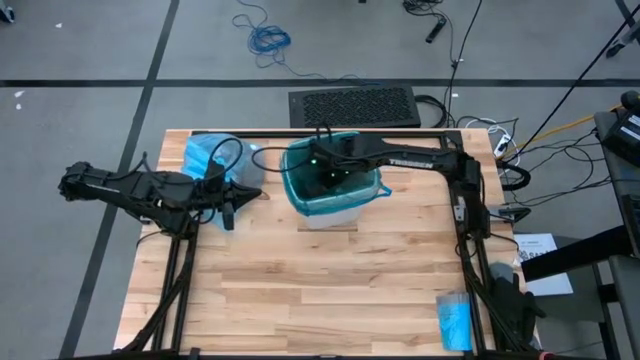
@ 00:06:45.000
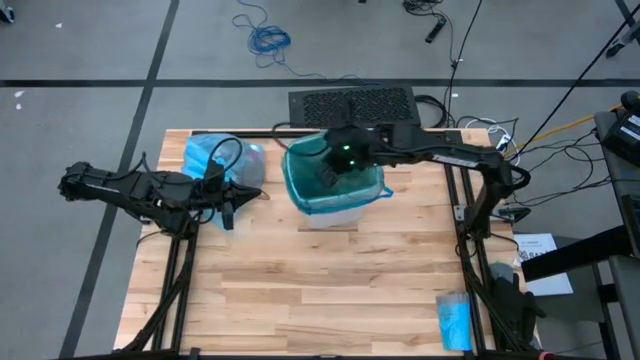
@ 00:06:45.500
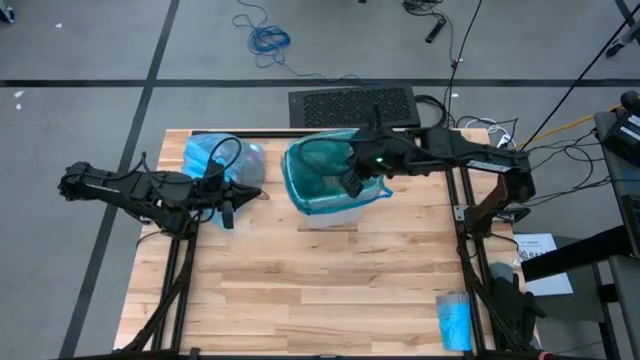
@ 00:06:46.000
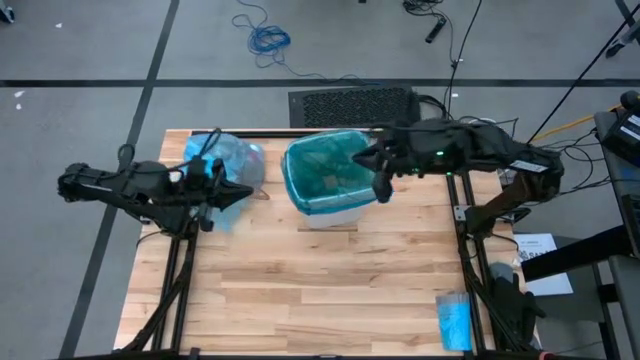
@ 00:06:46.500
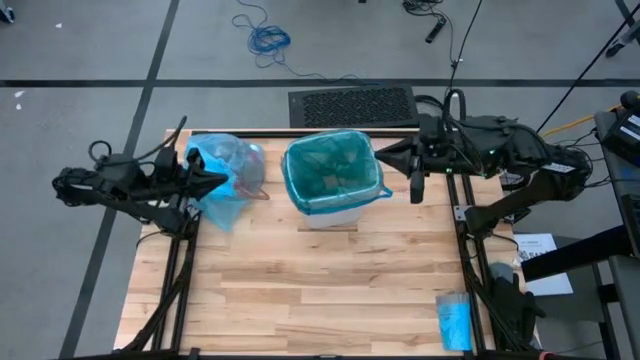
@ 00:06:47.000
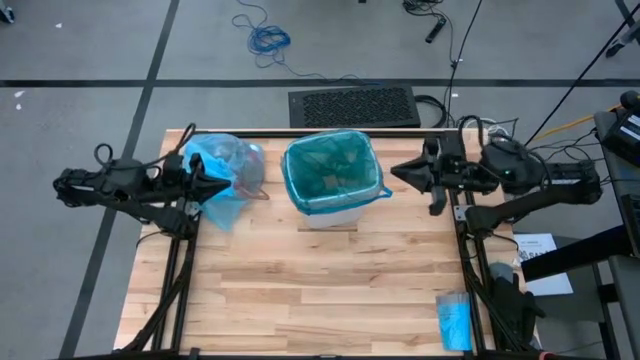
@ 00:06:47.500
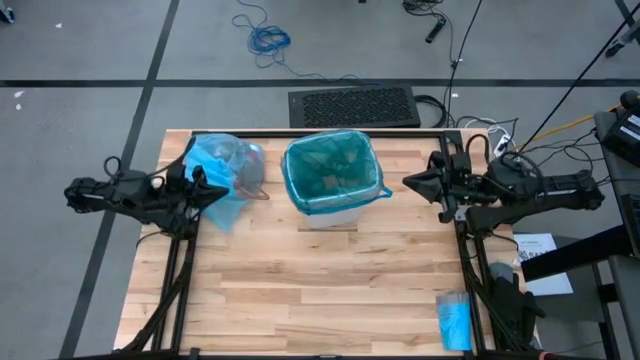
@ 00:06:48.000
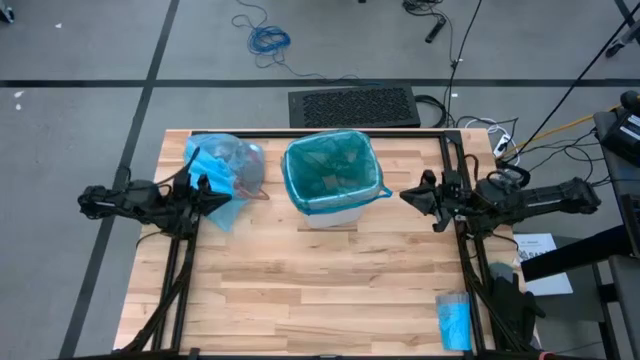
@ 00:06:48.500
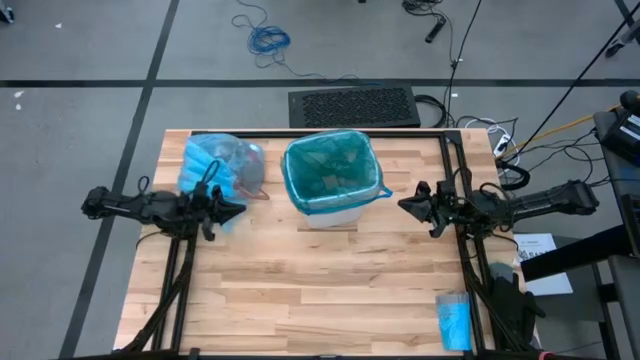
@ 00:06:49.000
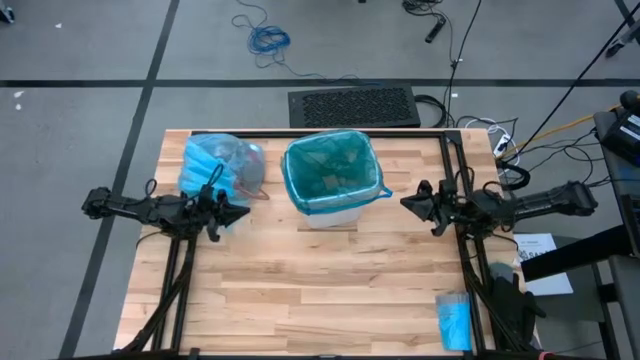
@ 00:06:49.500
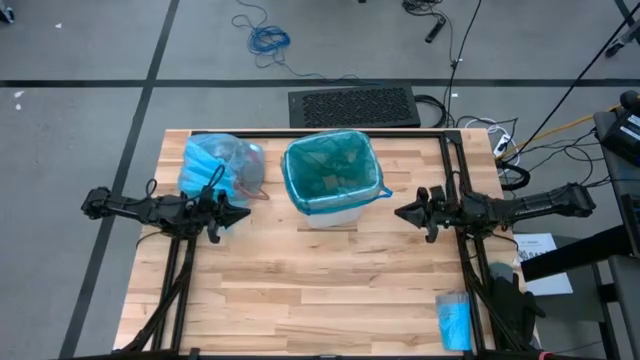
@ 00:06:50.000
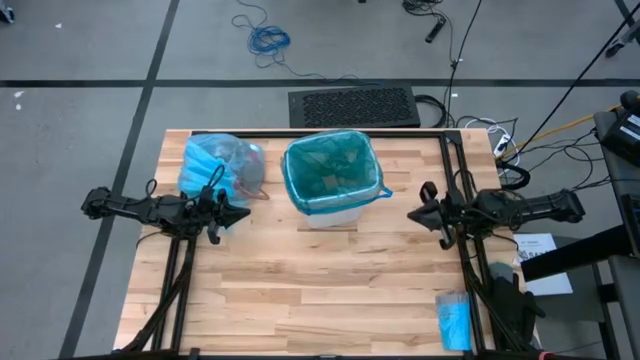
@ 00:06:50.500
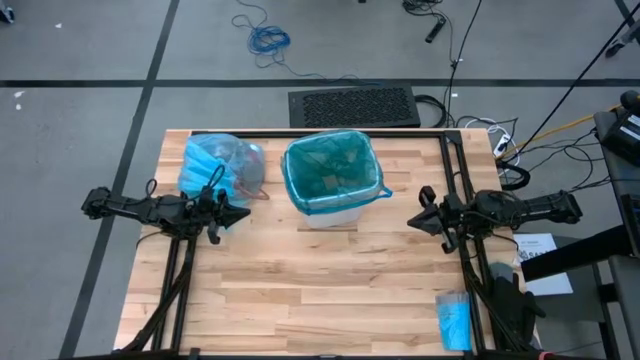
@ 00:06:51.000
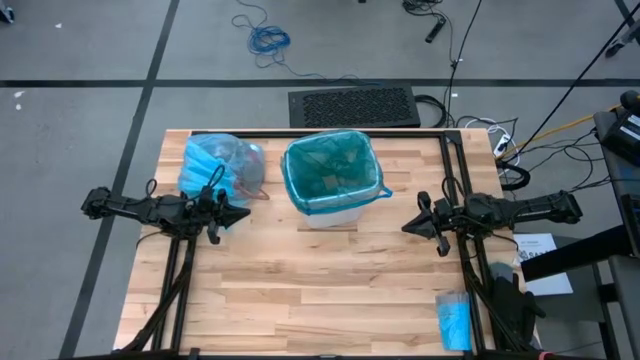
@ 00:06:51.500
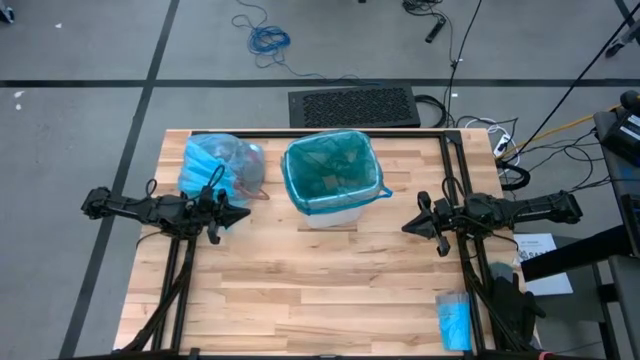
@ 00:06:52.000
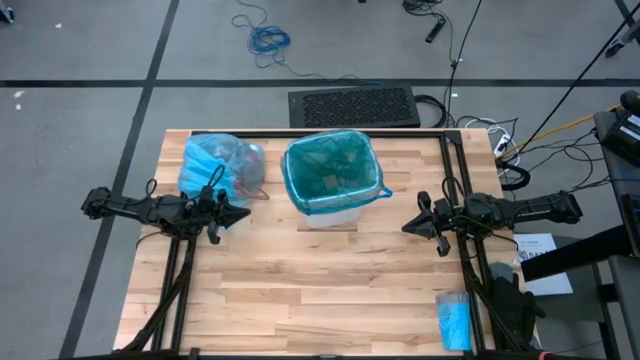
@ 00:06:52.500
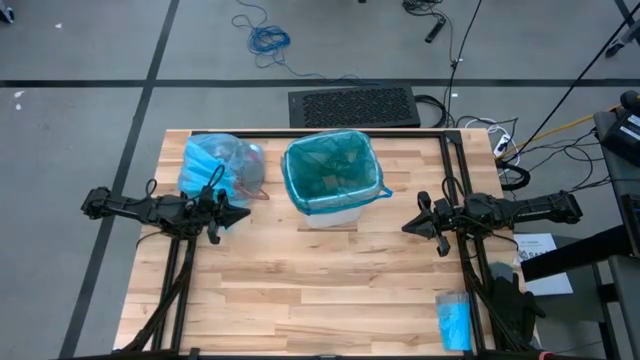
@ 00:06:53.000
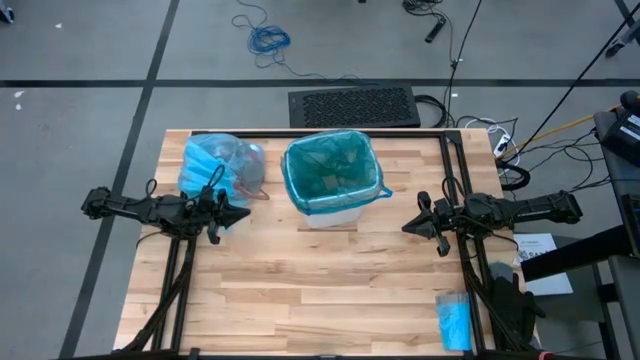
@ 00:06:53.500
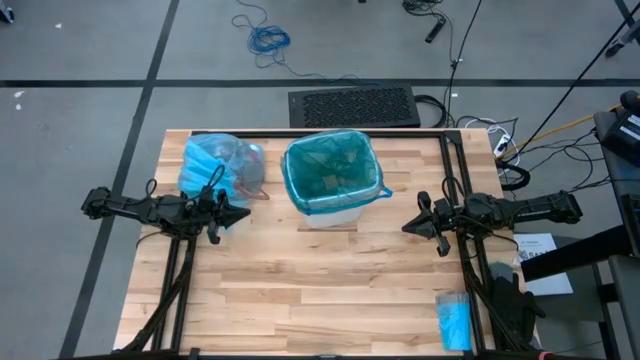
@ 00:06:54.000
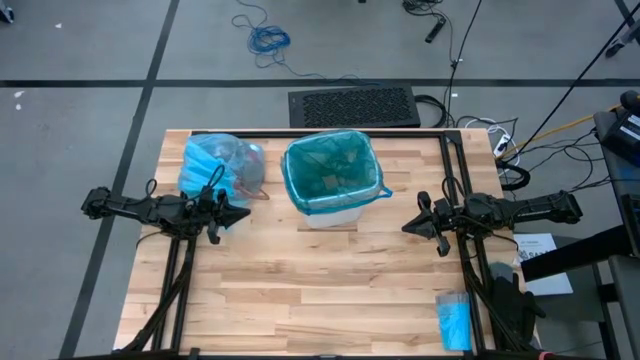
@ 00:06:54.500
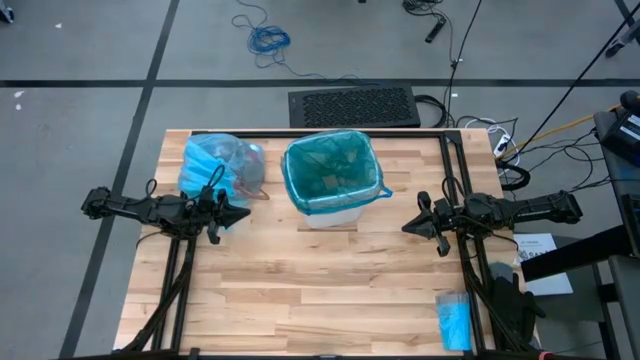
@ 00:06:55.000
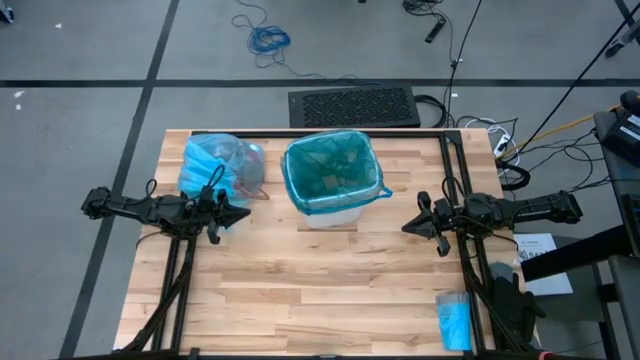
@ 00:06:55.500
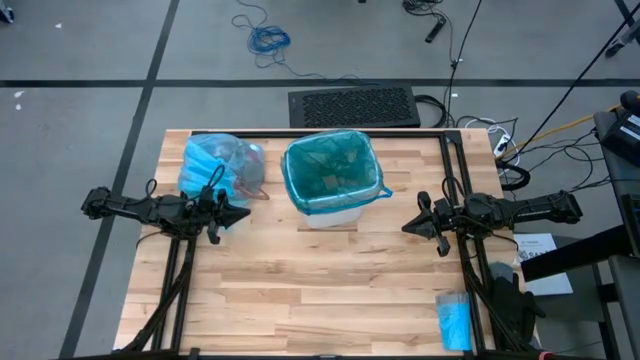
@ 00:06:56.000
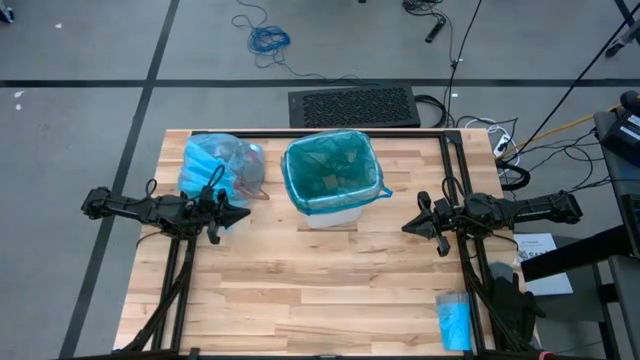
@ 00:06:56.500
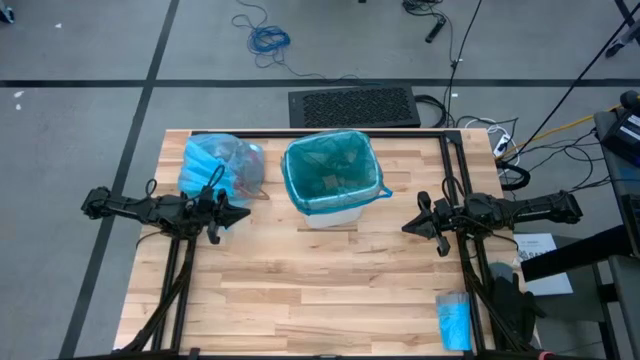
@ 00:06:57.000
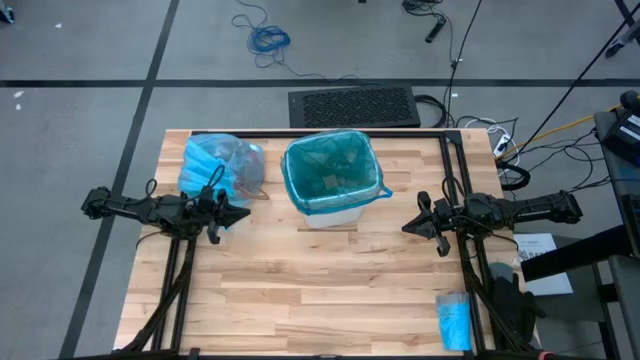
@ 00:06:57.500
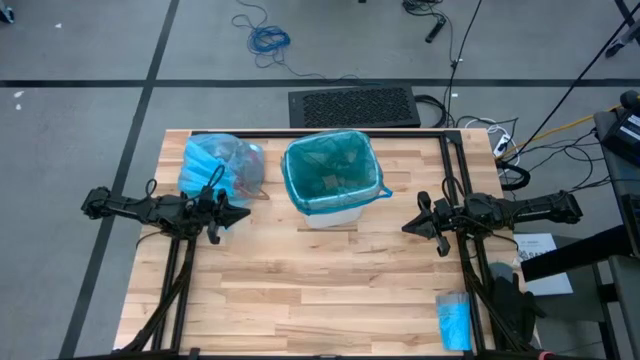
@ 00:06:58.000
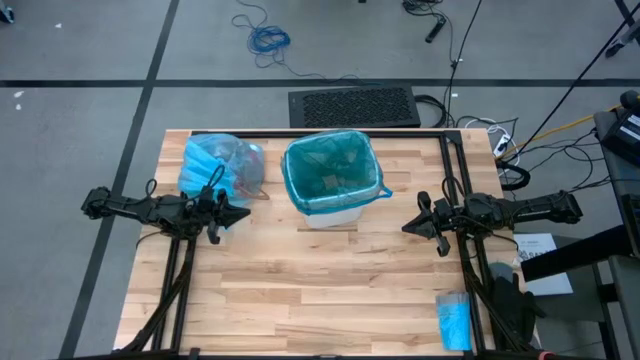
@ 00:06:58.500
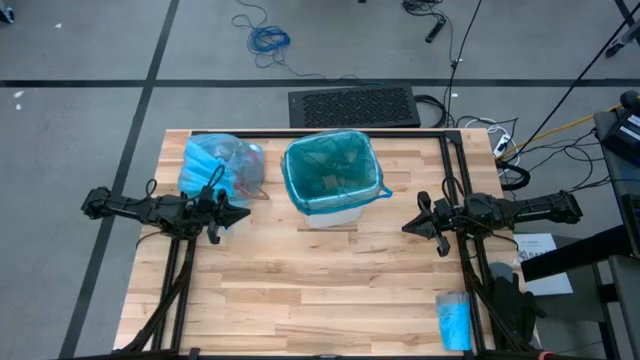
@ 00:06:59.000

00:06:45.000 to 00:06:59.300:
Task: place trash/remove bag and relplace
Return to Home Position

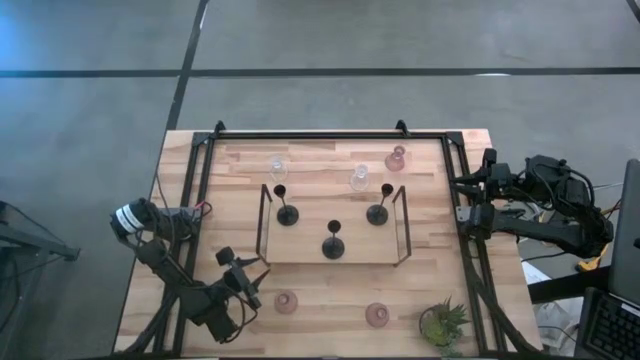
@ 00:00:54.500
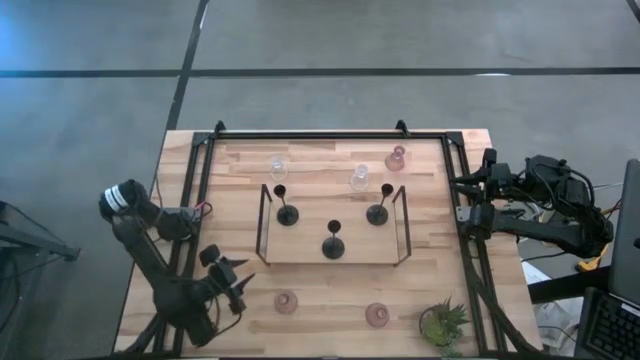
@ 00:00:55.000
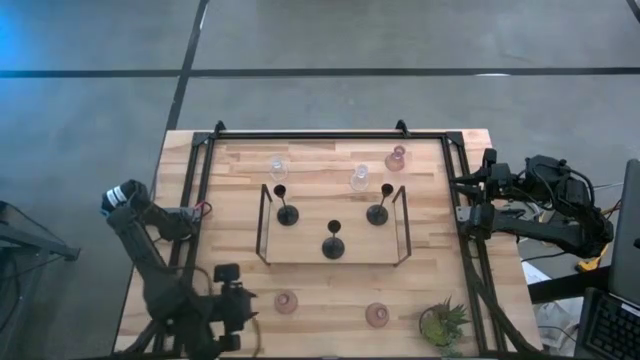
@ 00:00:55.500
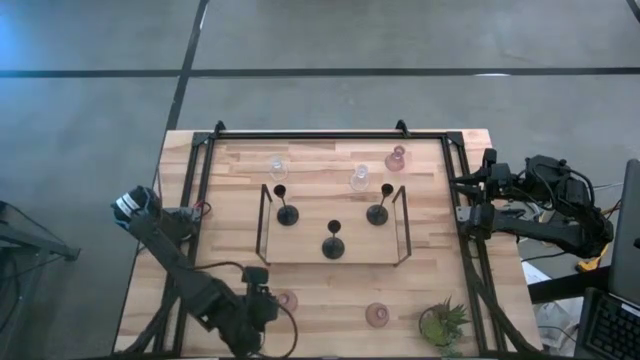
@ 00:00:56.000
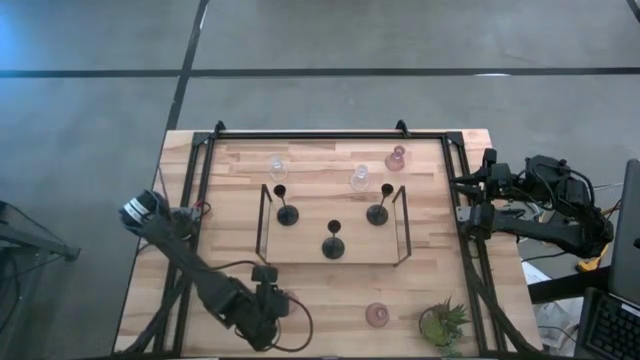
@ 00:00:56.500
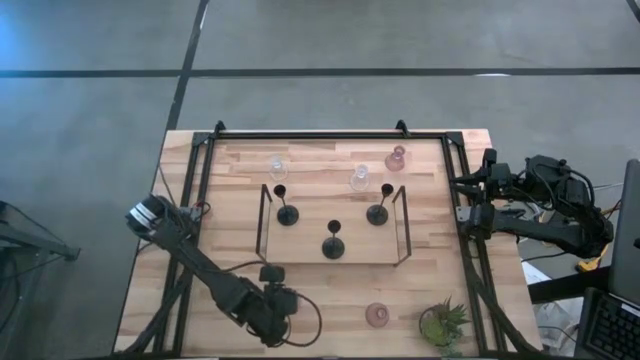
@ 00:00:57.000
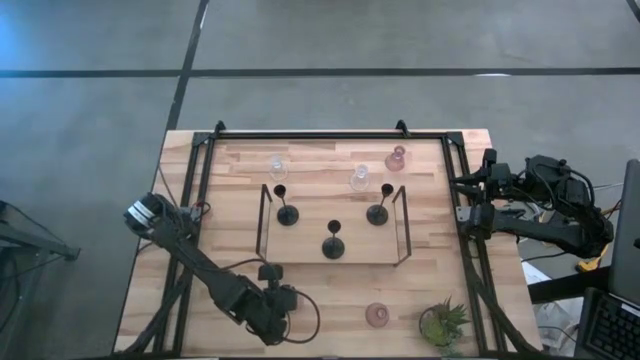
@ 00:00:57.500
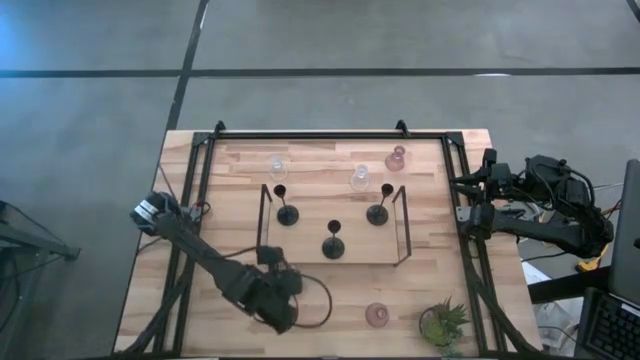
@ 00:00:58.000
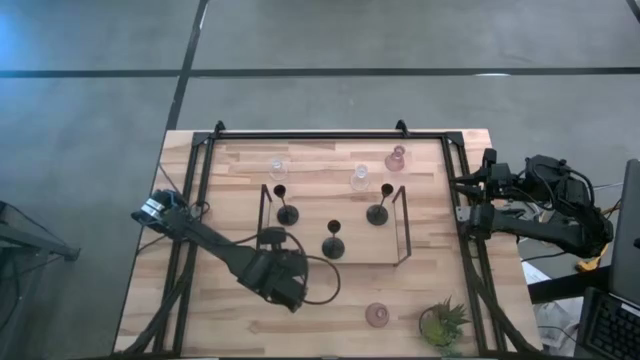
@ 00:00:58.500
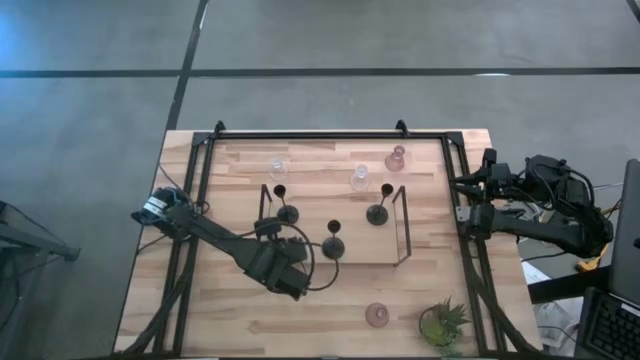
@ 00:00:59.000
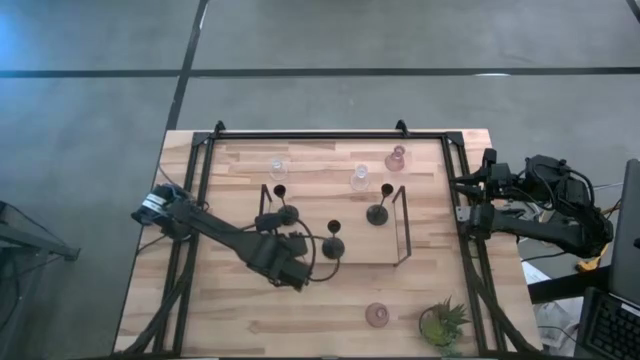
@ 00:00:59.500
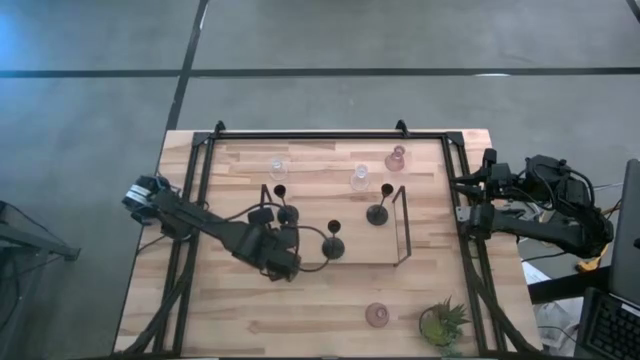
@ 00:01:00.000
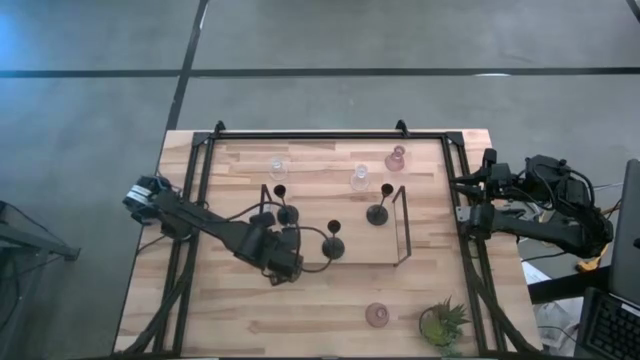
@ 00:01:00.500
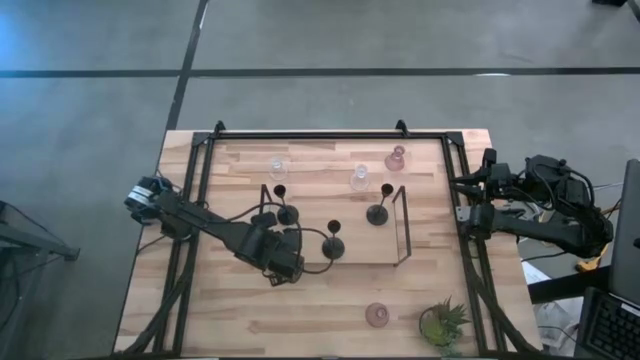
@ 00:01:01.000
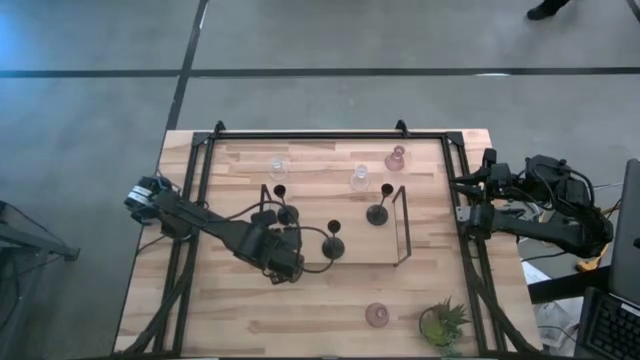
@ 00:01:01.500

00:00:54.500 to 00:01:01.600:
Task: Pick & Place candle stick holders
Put the bottom left pink glass candle holder on the shelf
